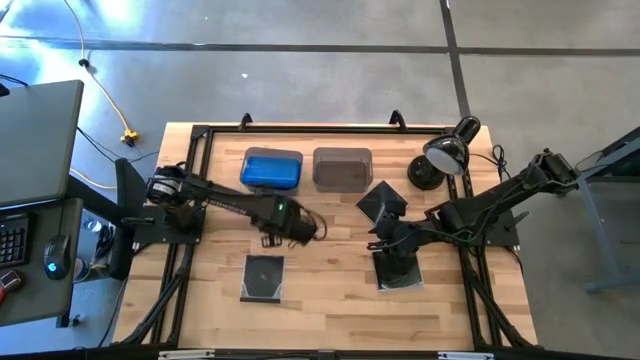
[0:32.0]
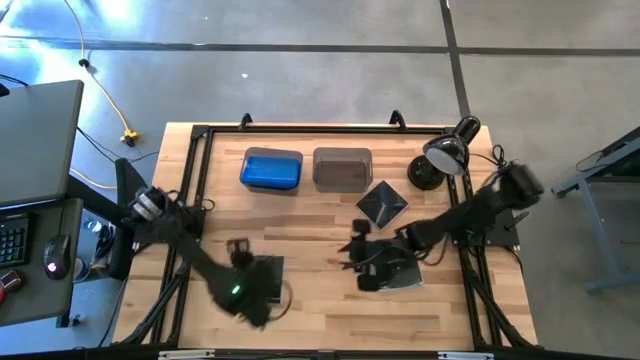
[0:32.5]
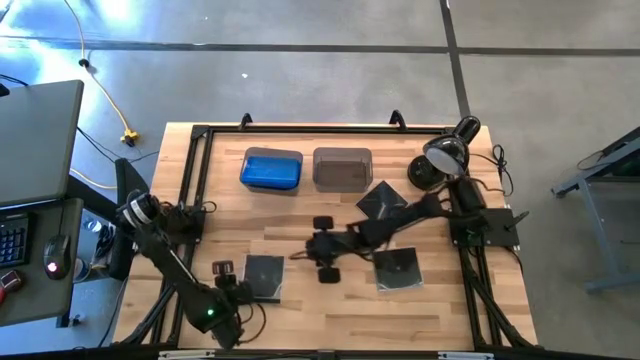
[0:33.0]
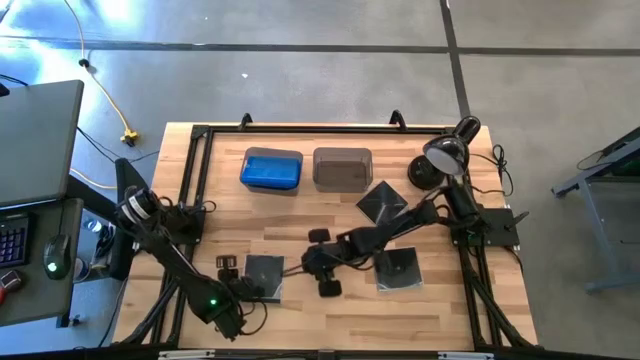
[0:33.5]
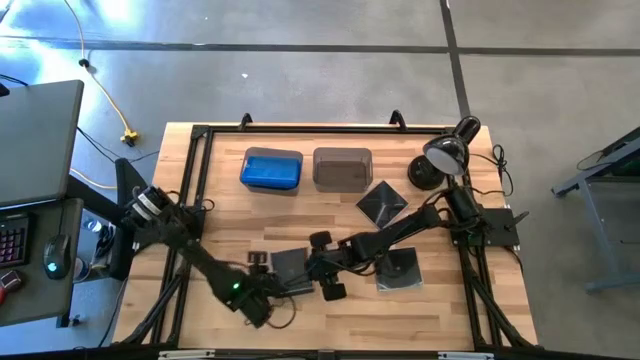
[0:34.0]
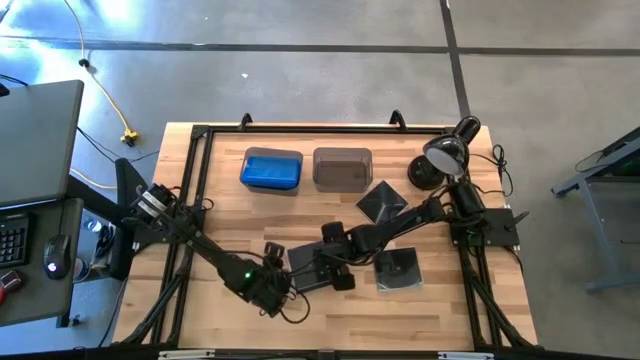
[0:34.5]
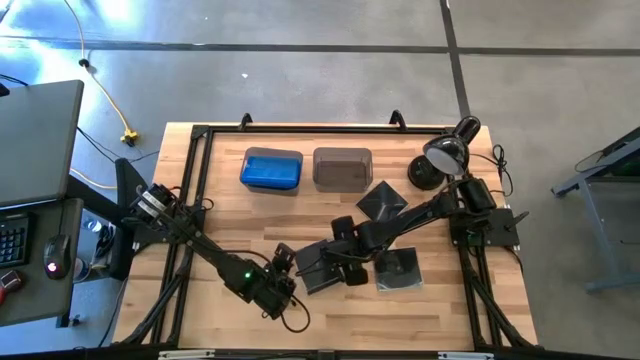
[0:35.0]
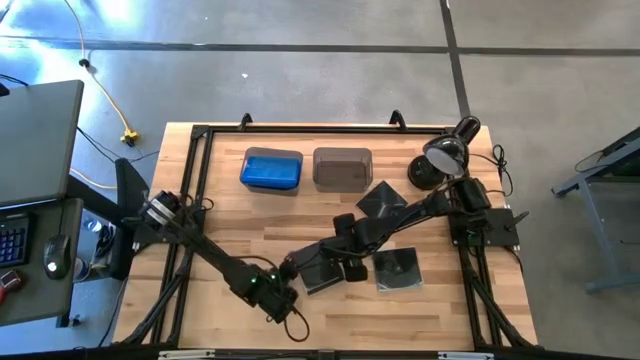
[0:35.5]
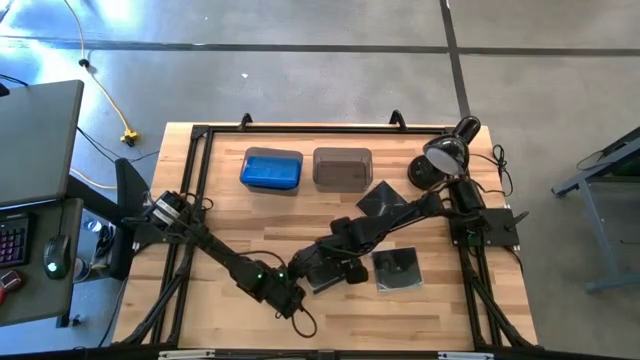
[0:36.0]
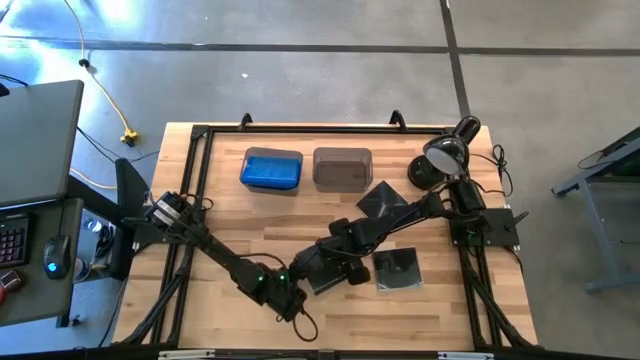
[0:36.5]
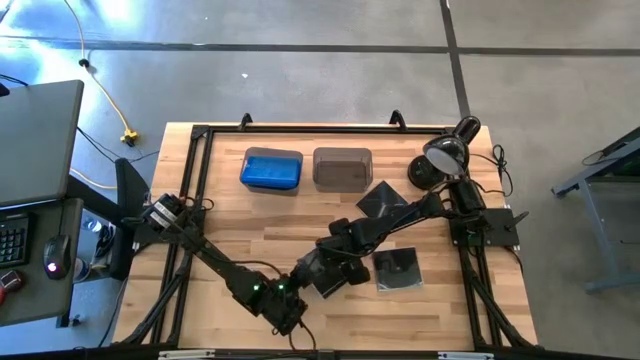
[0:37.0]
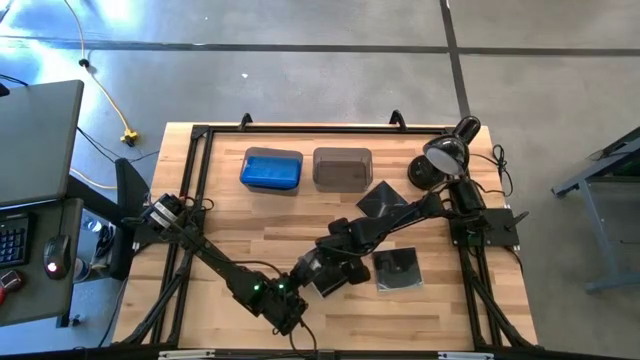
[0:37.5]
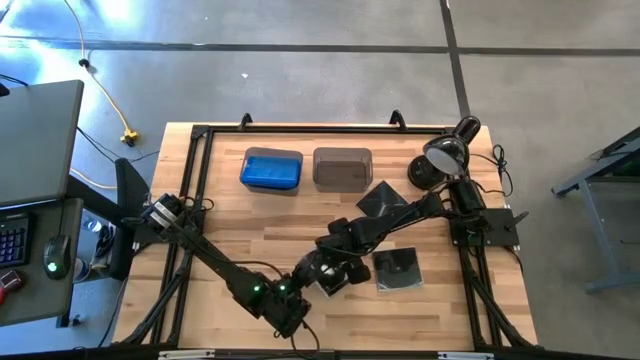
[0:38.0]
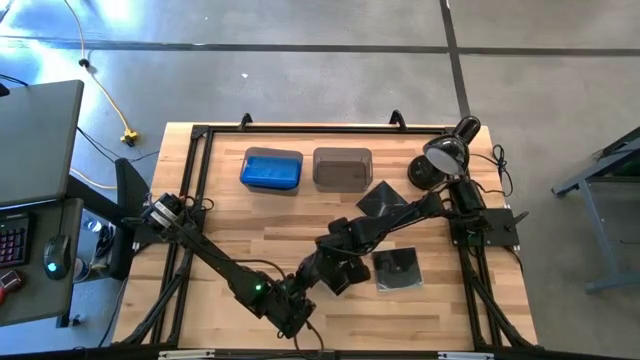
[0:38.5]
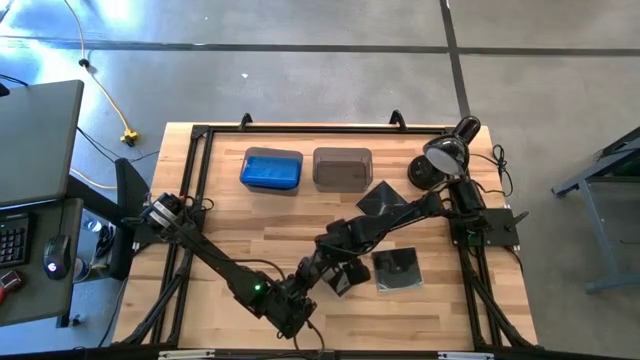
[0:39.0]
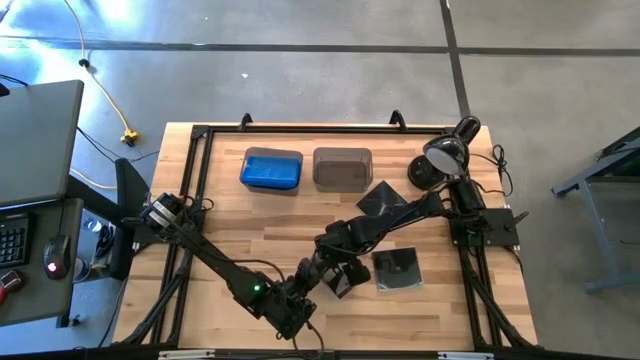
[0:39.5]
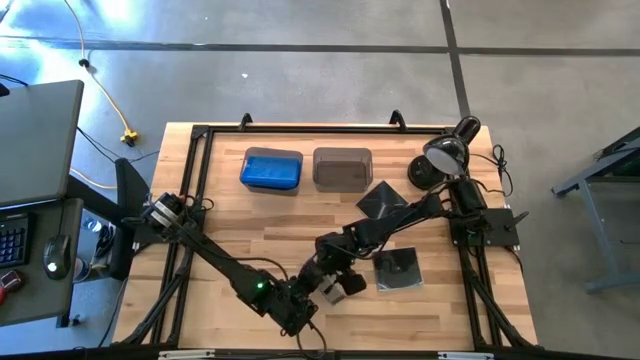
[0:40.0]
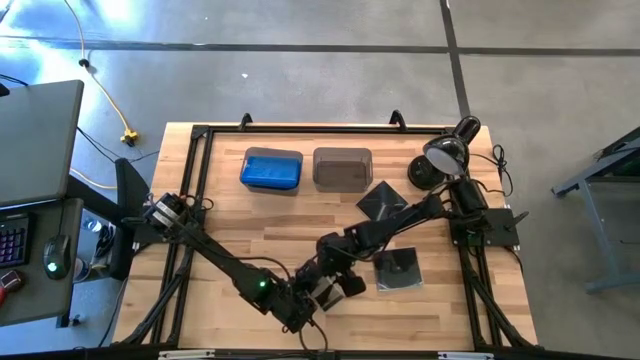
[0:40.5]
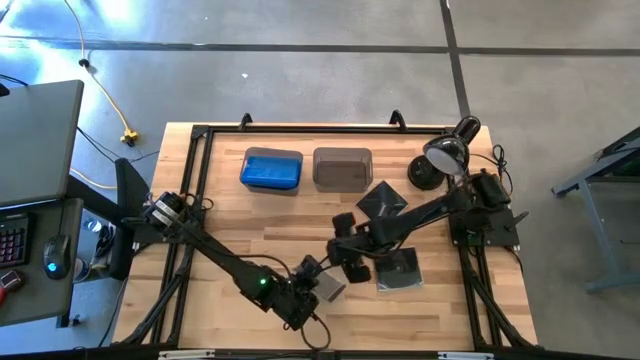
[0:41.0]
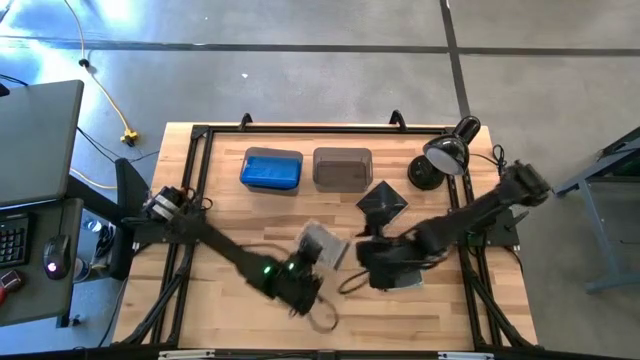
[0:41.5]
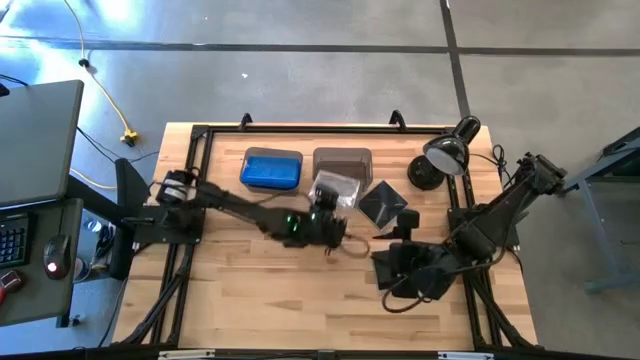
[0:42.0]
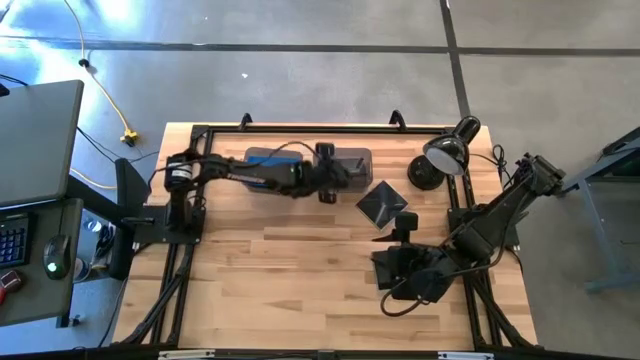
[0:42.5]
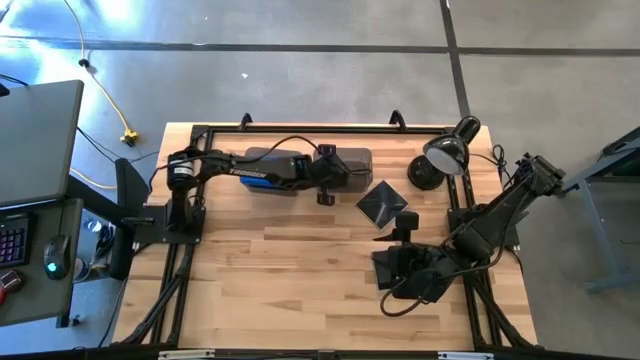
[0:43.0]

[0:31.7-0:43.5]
Task: Pick & place jewel cases by type
Put the bottom left black CD case into the right black bin

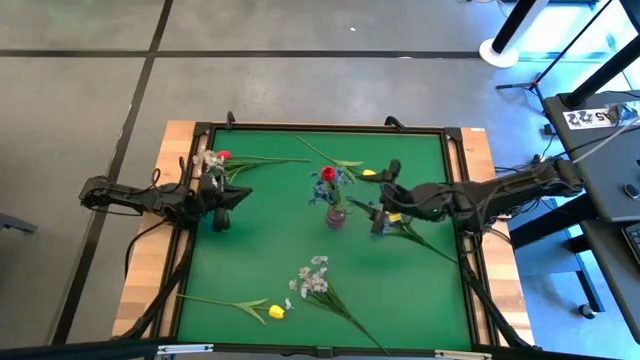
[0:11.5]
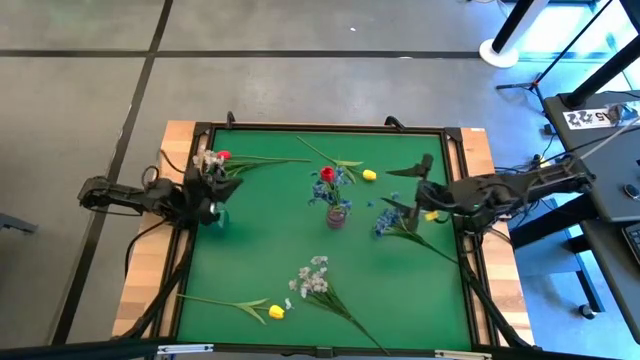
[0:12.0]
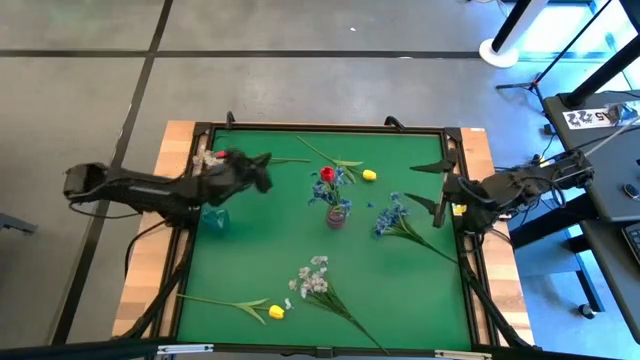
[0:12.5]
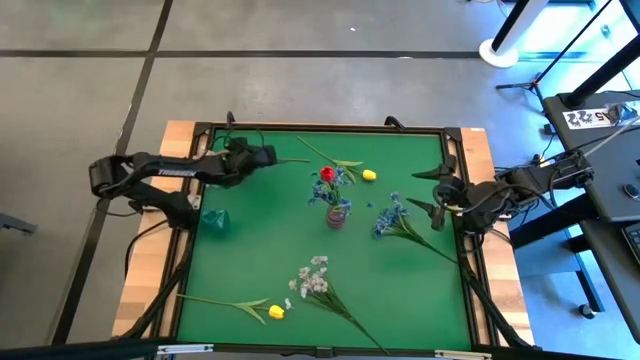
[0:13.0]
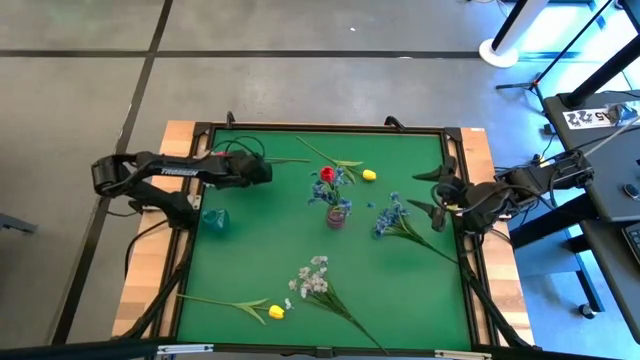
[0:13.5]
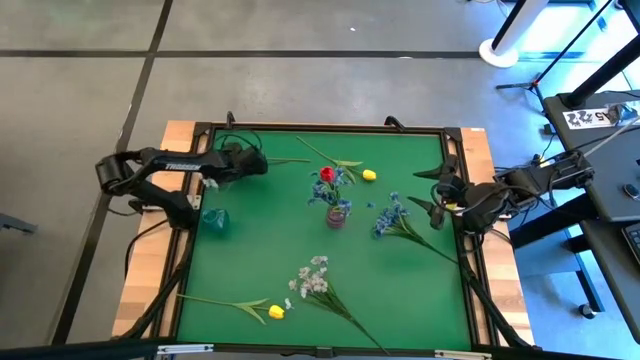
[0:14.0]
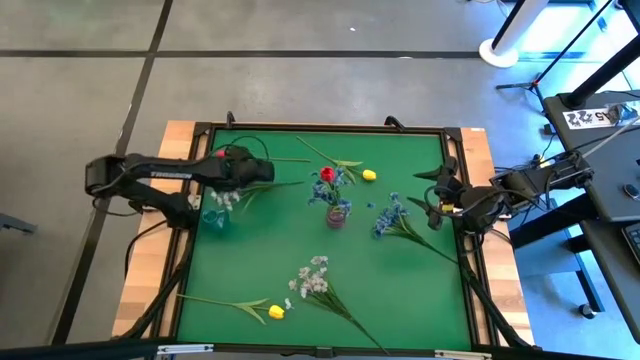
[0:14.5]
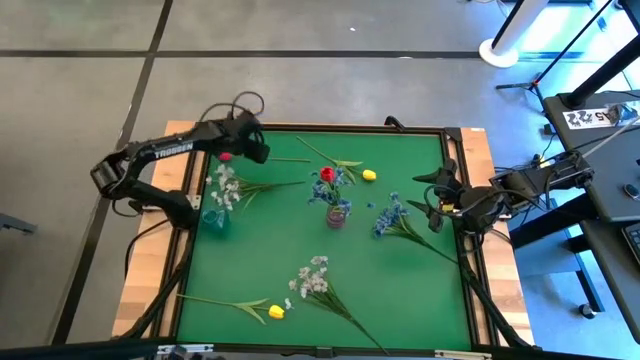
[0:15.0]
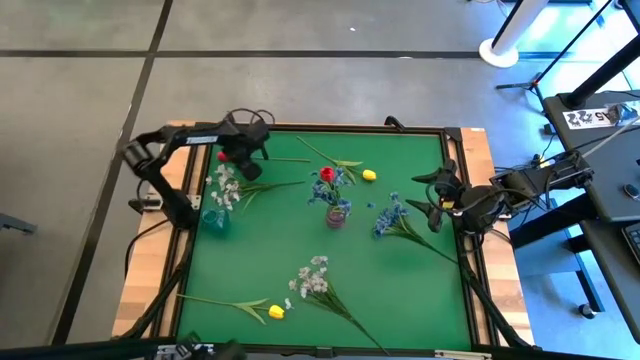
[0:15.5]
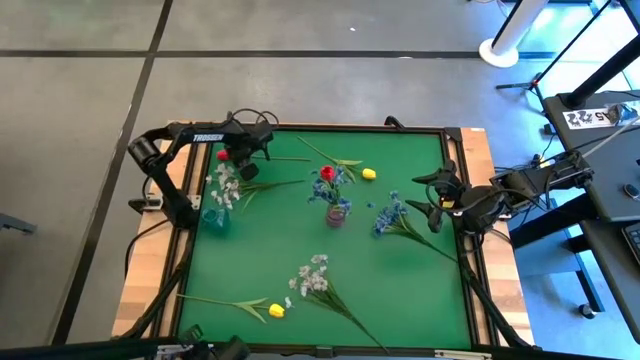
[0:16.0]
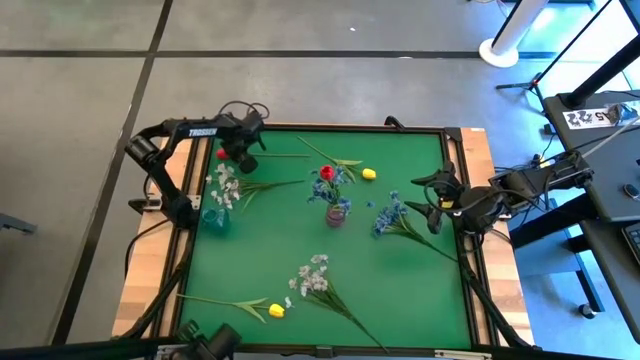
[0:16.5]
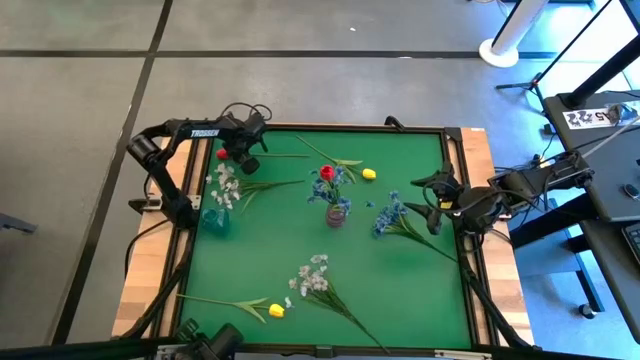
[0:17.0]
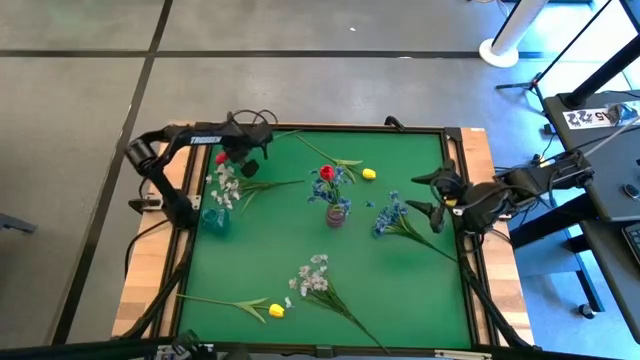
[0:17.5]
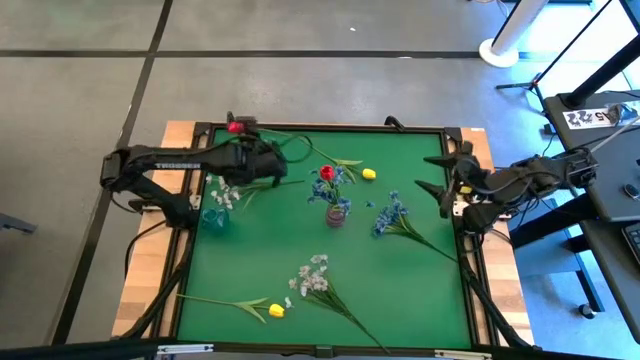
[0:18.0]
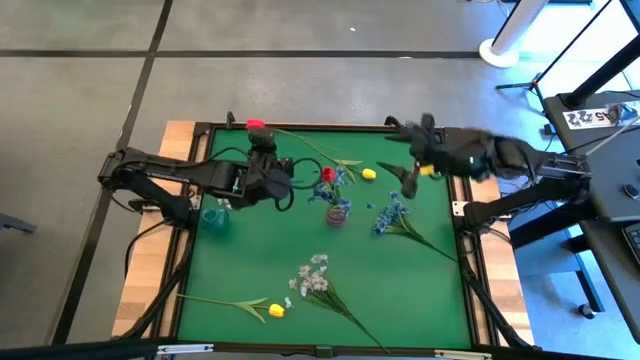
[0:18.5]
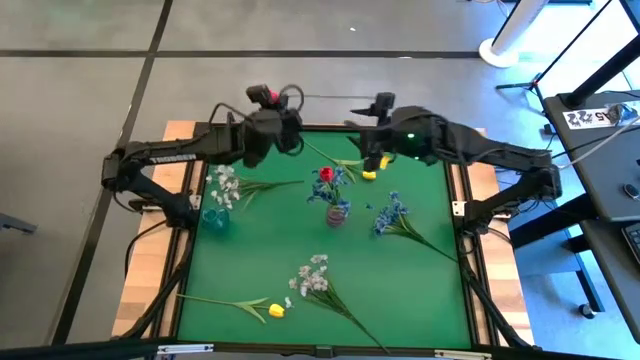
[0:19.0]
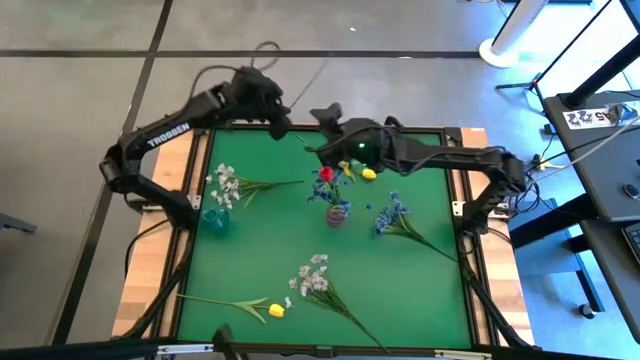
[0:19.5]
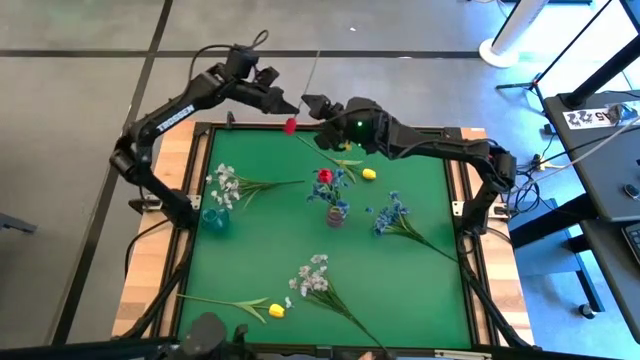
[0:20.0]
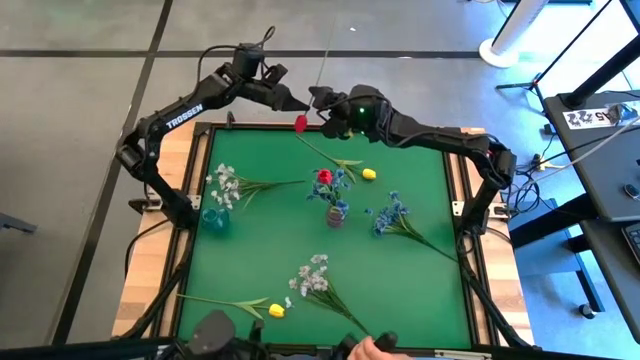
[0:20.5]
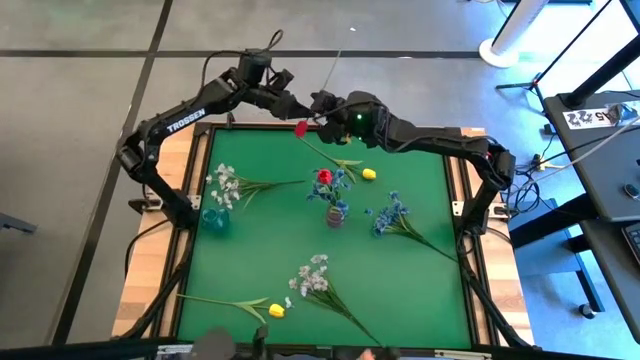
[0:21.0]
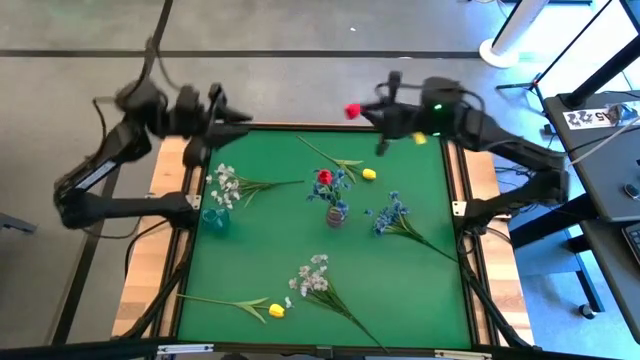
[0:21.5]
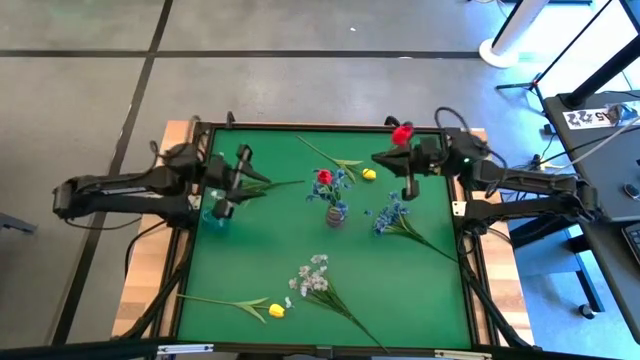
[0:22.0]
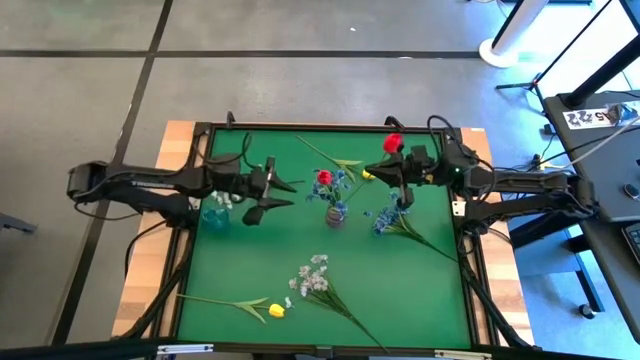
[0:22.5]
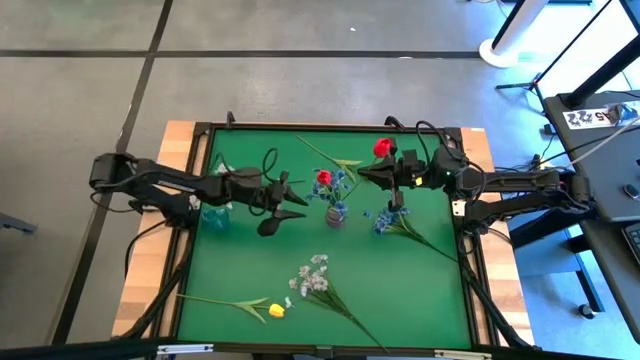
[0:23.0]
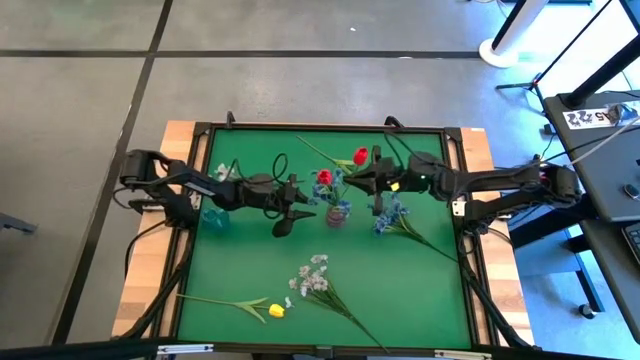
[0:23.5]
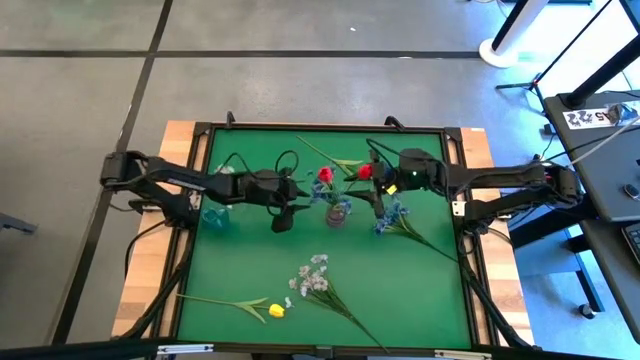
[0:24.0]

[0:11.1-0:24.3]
Task: Sort flowers into vase by color
Put the red flower into the purple vase
